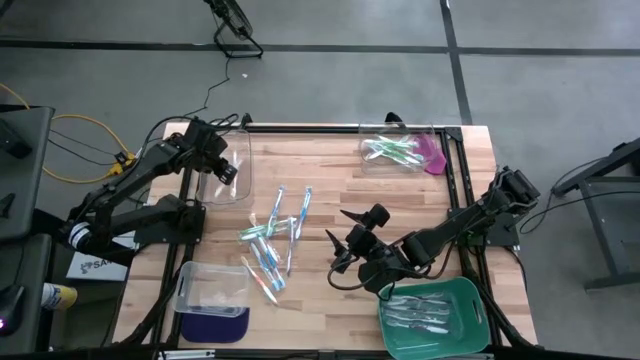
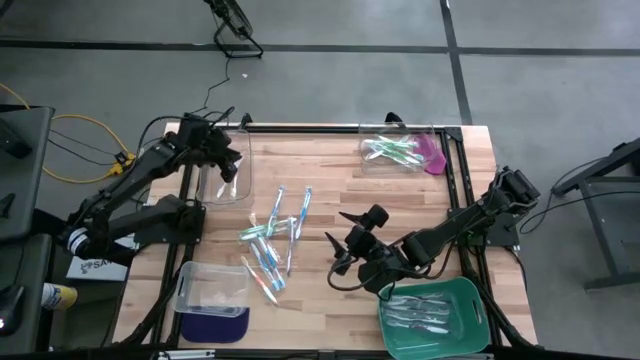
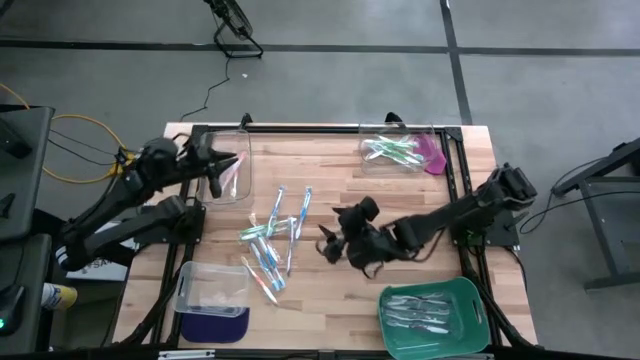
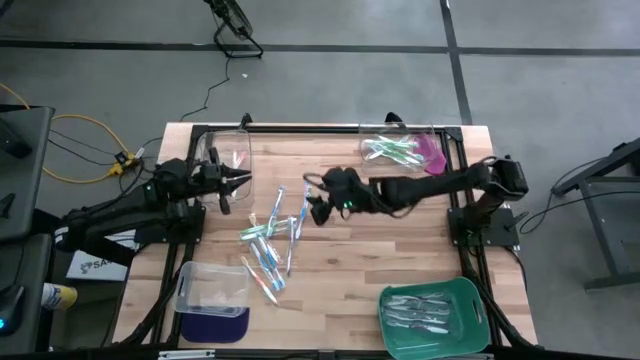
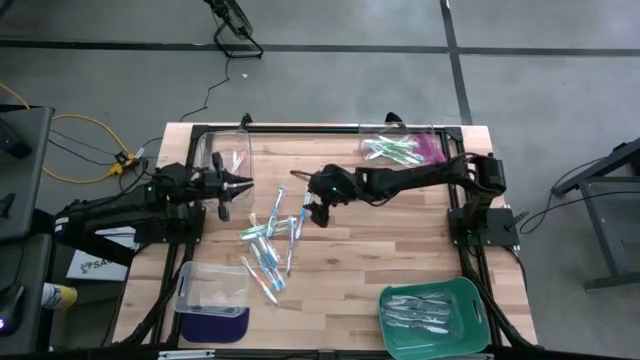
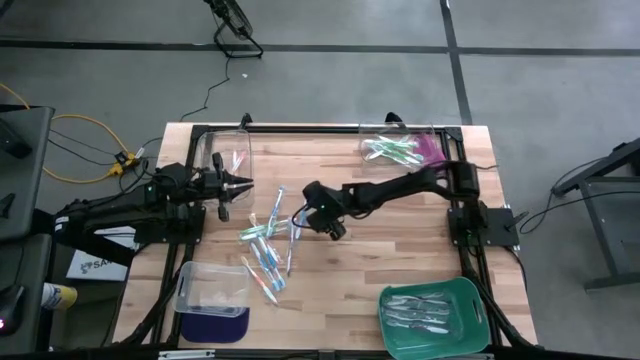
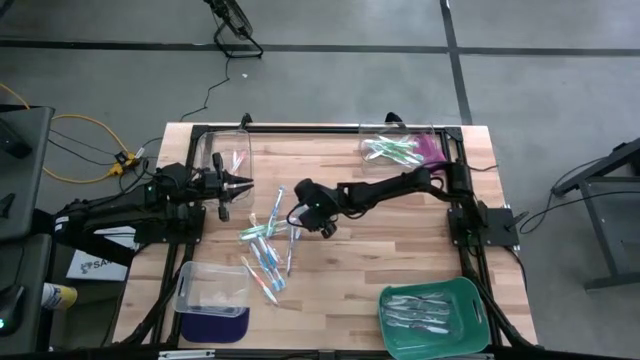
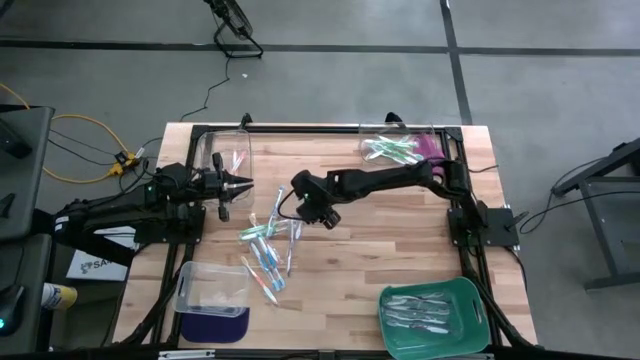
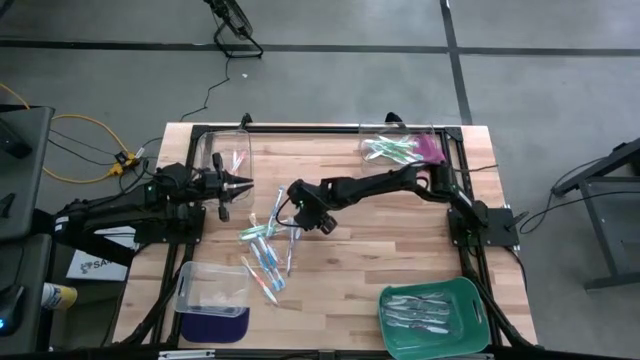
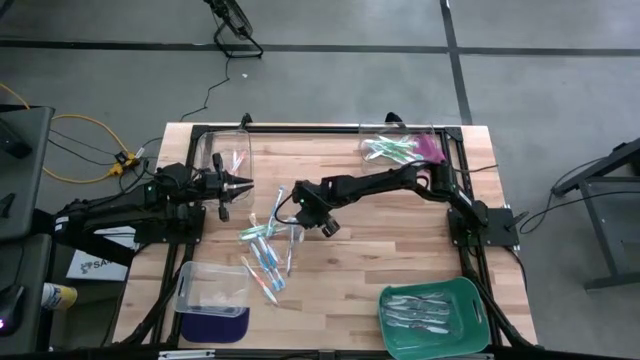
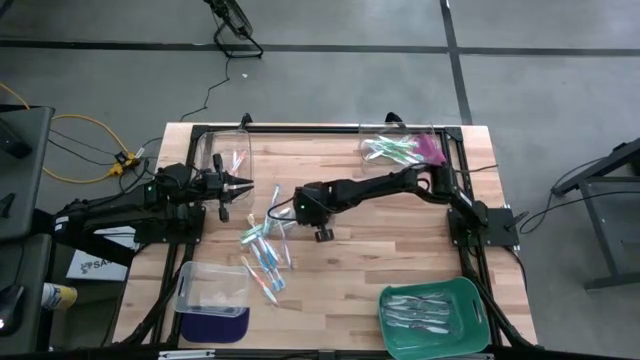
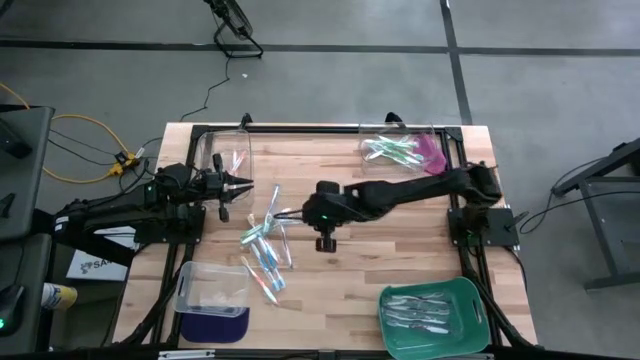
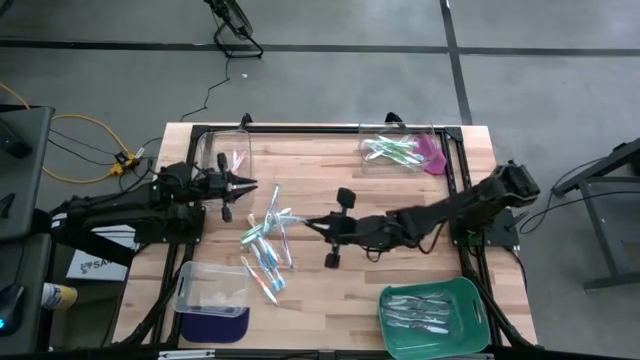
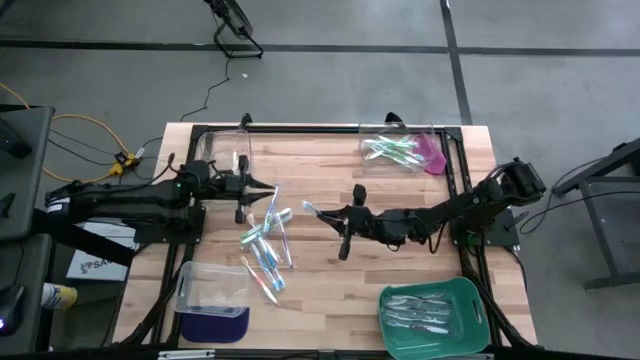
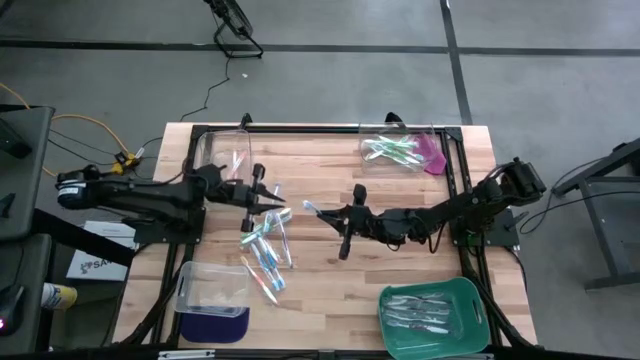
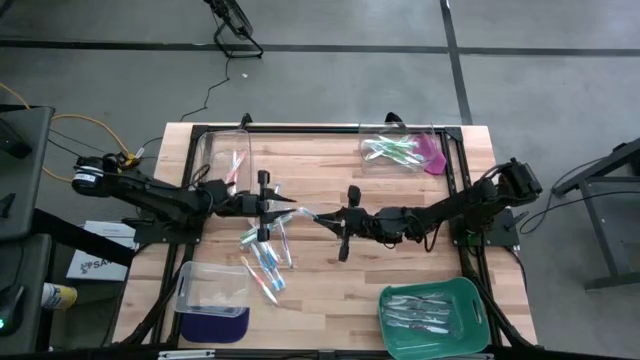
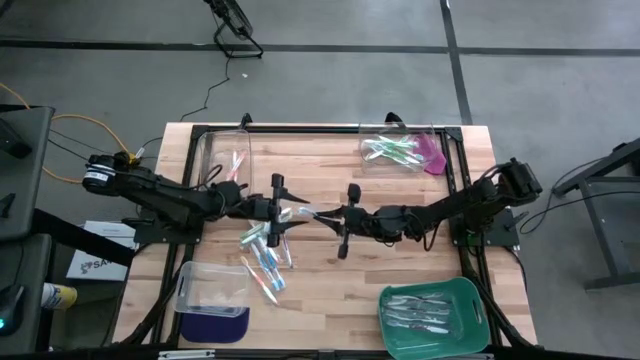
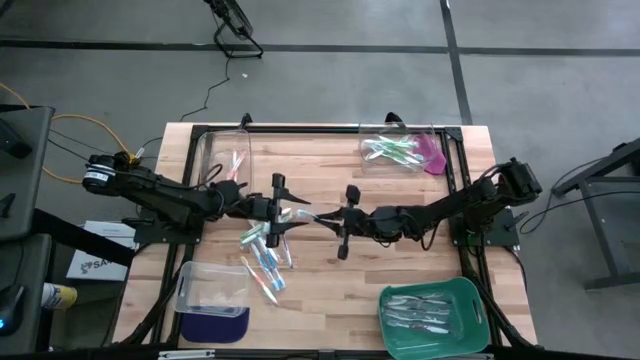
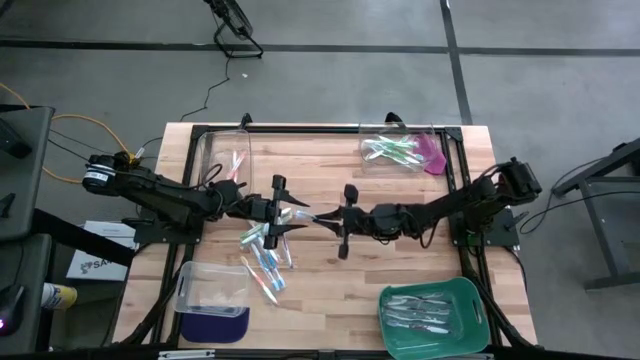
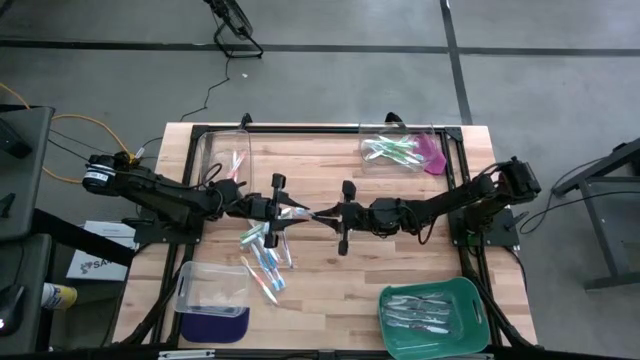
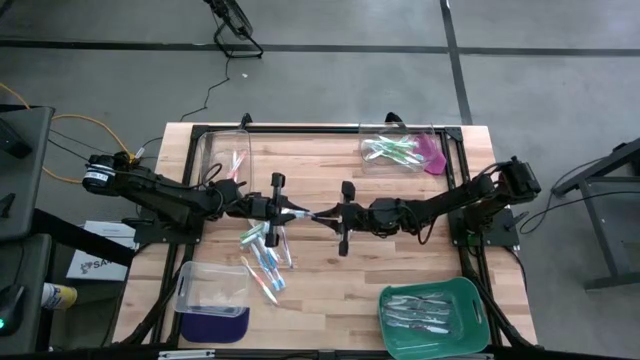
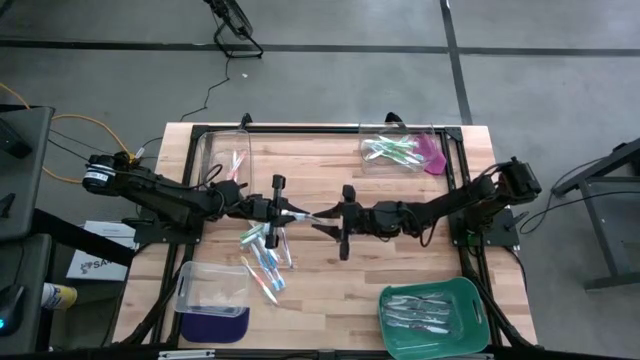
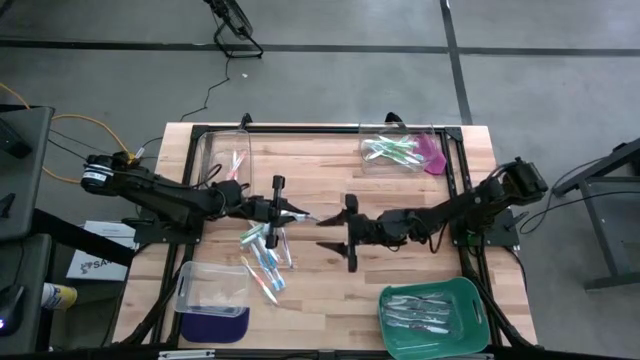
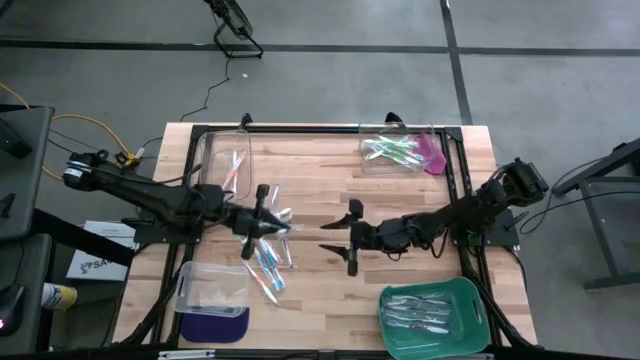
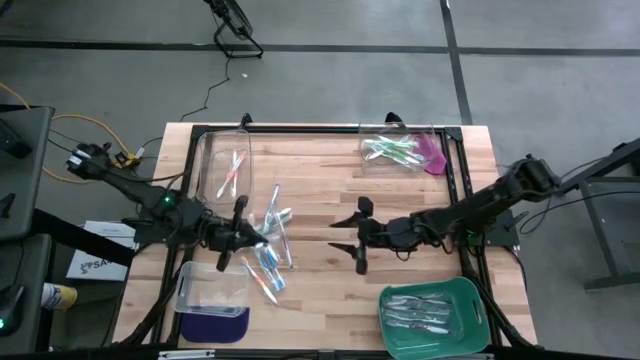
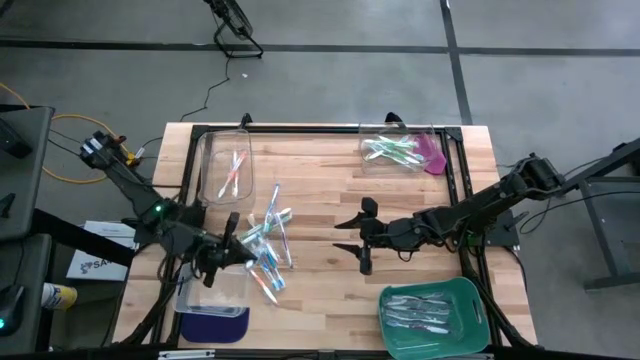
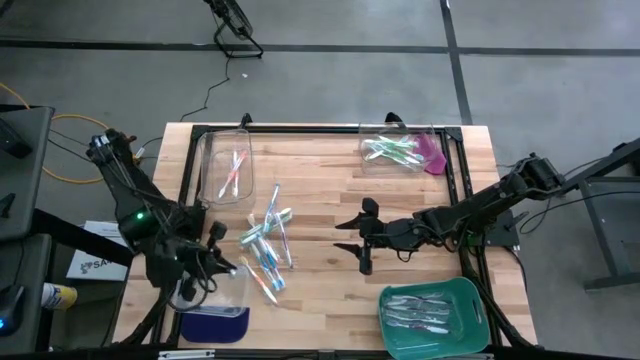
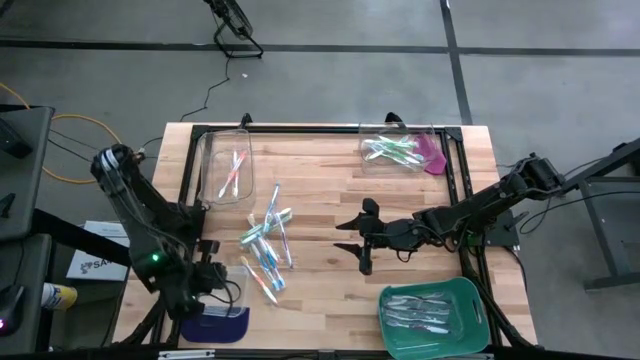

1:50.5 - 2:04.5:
Task: Pick & Place Toothbrushes
Put the blue toothbrush into the bottom transparent bin

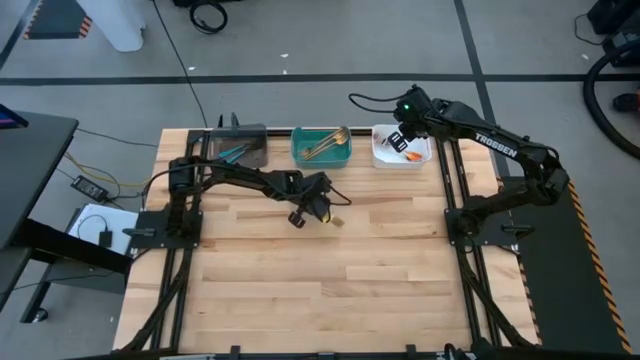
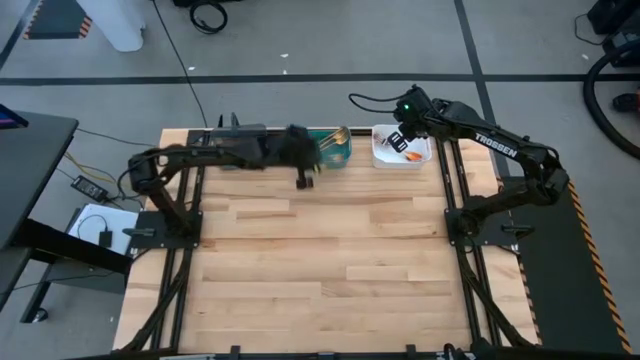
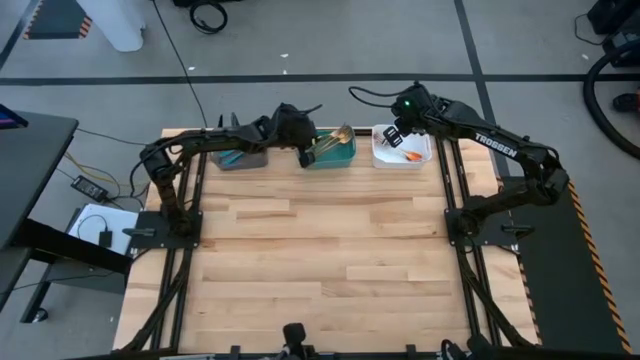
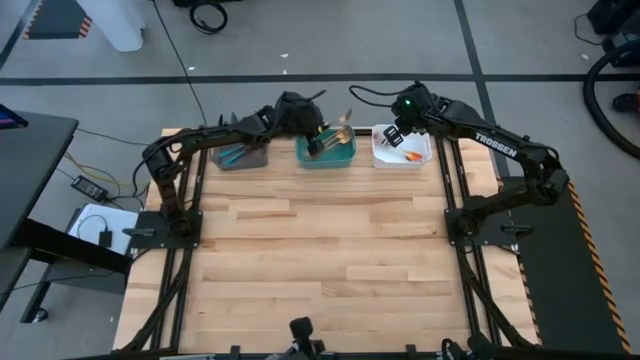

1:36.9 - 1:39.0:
Task: Sort silverware by color (type)
Put the gold fork into the green bin

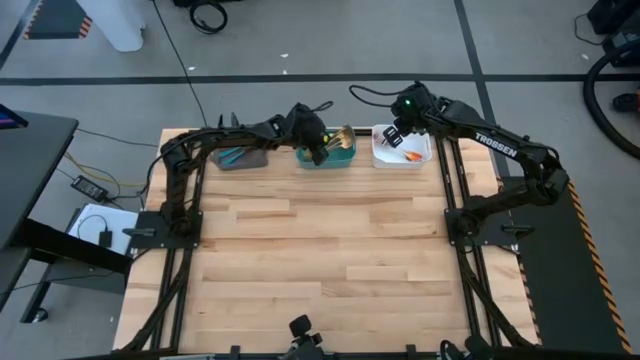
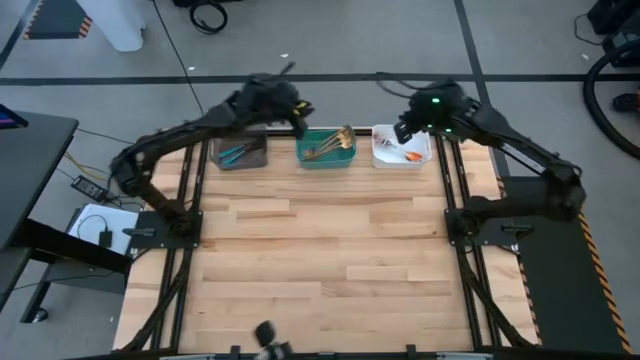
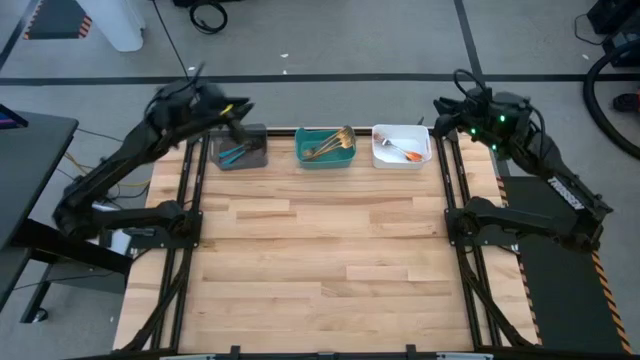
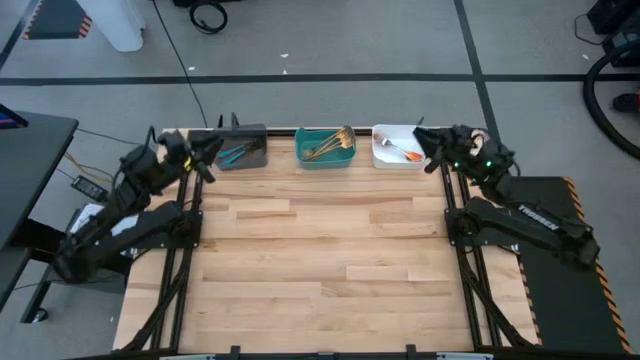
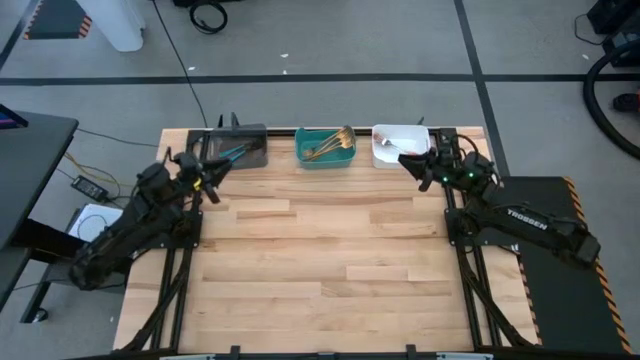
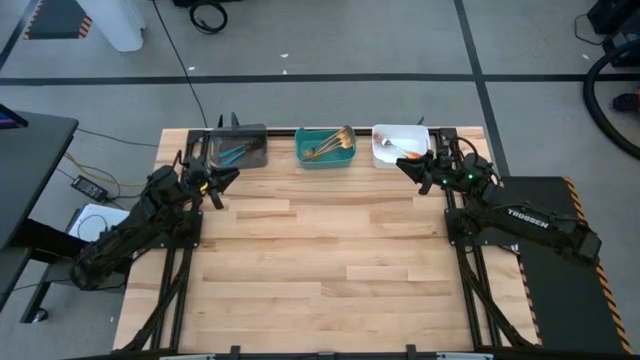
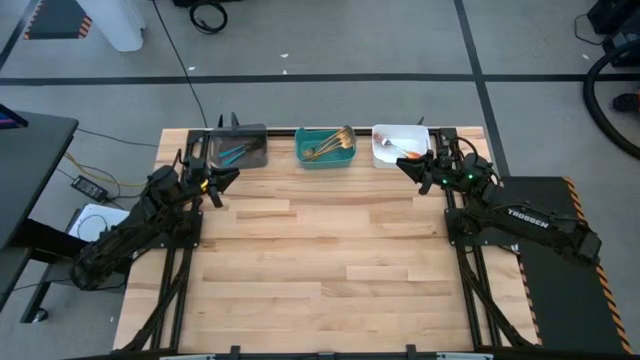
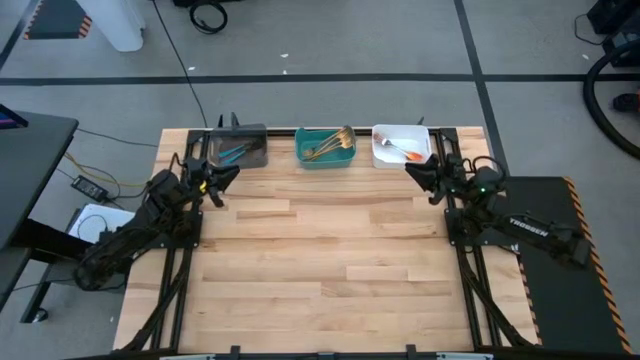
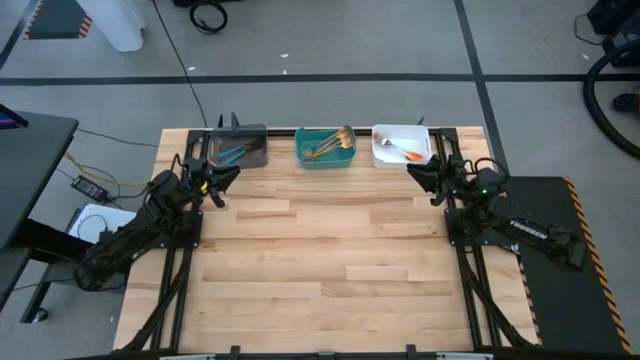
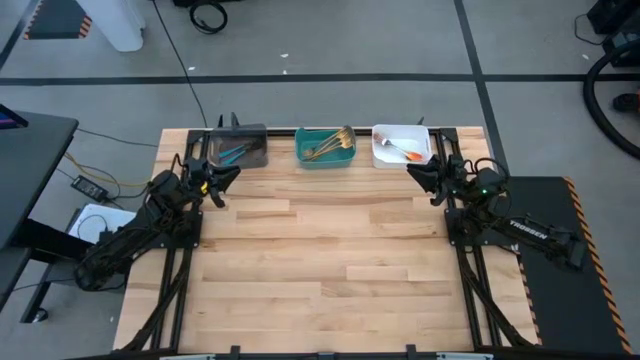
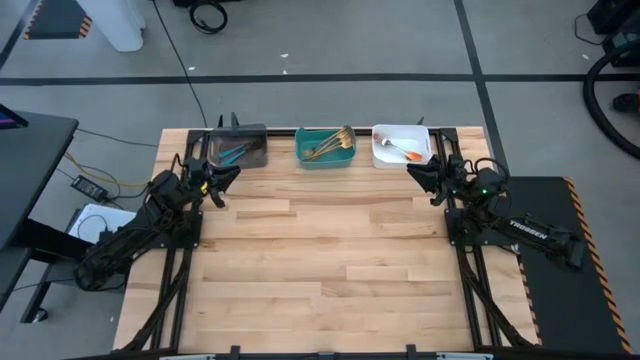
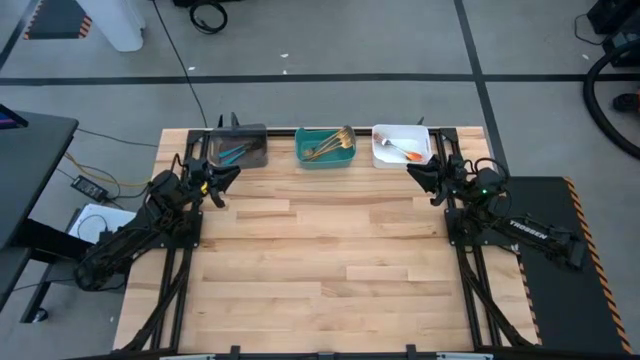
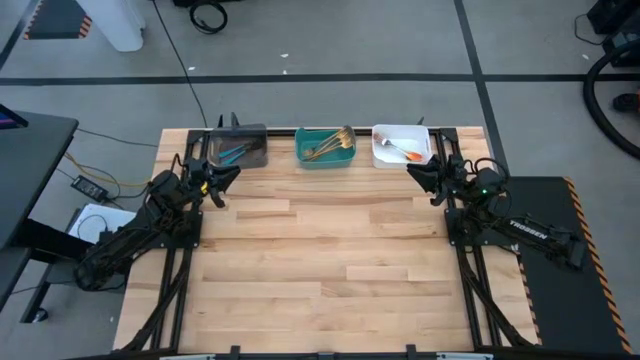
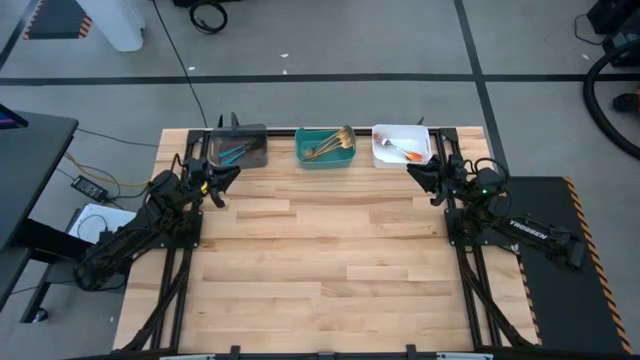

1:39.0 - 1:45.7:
Return to Home Position
